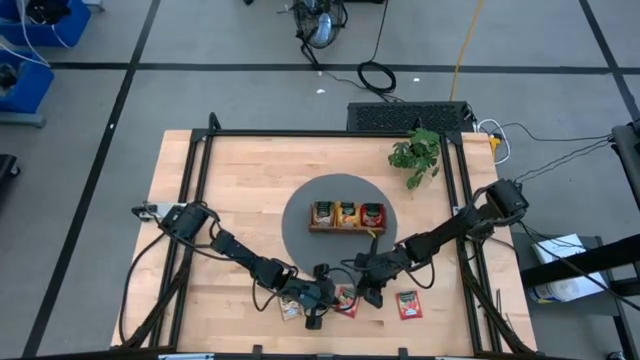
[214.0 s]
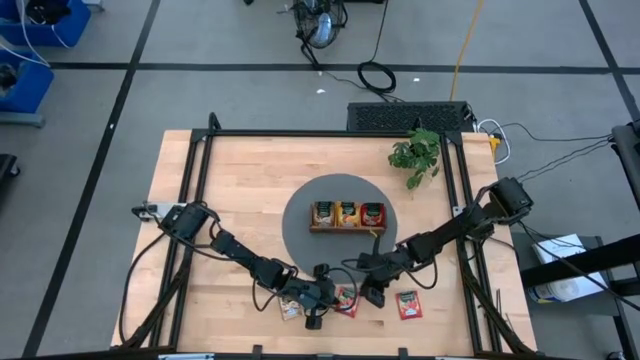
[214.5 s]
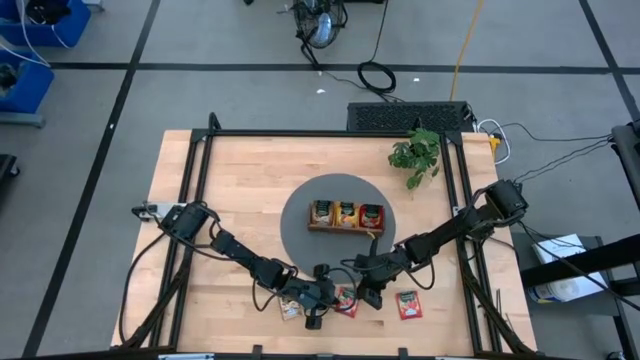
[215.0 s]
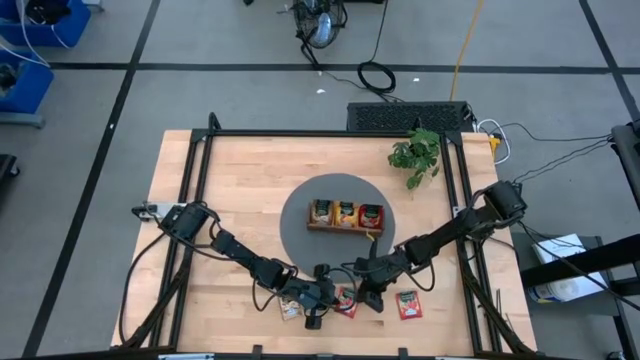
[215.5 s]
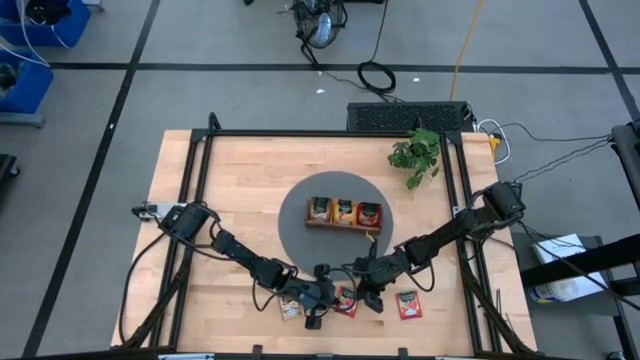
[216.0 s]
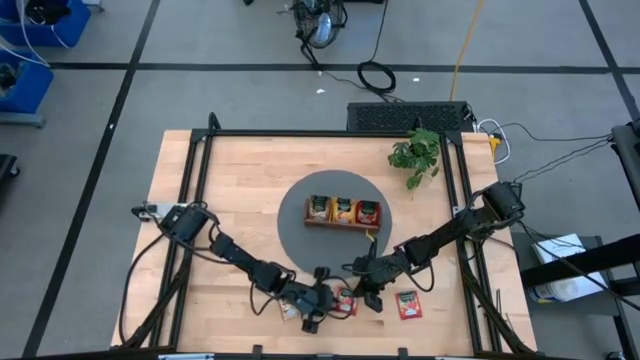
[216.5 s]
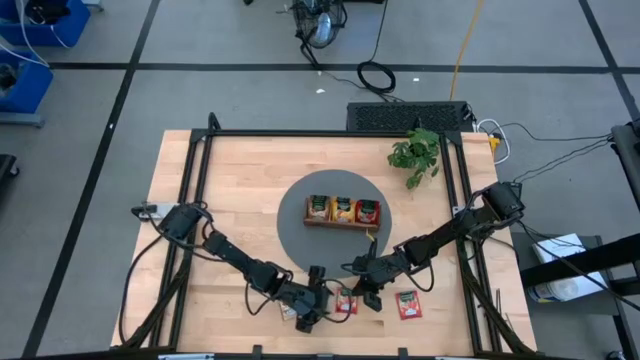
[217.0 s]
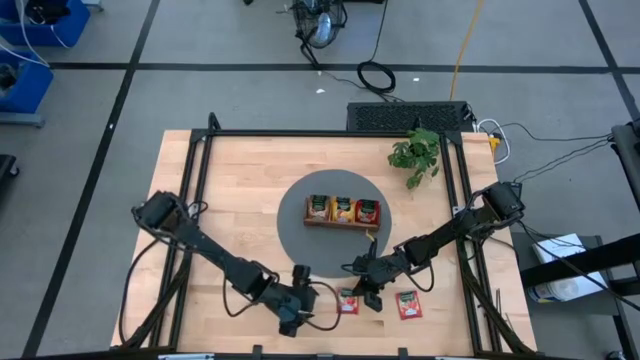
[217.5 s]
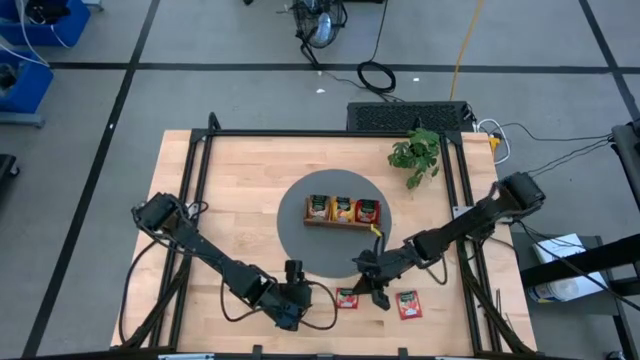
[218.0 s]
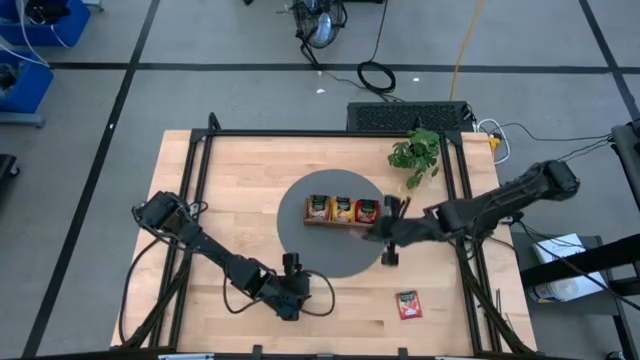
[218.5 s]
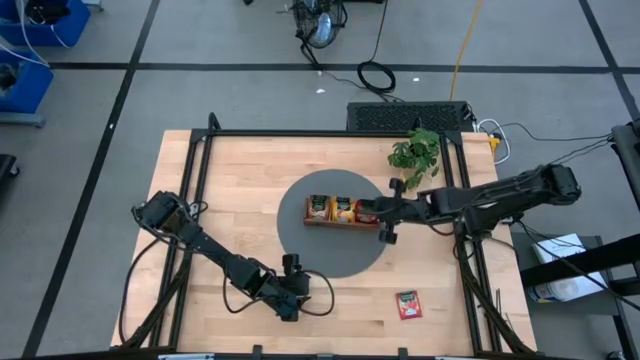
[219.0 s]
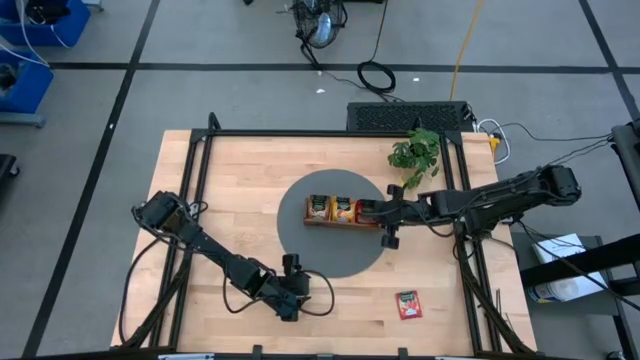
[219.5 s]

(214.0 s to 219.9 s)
Task: Pick & Place Tea
Put the red tea bag to the right section into the wooden organizer

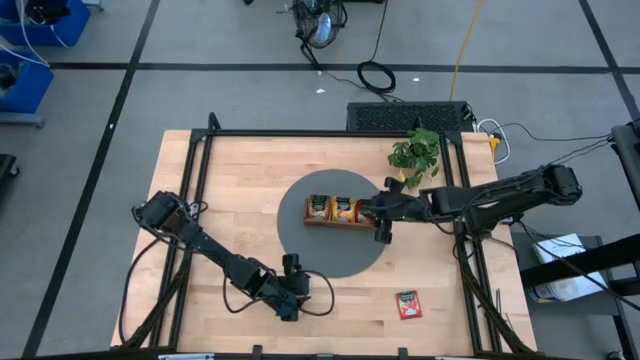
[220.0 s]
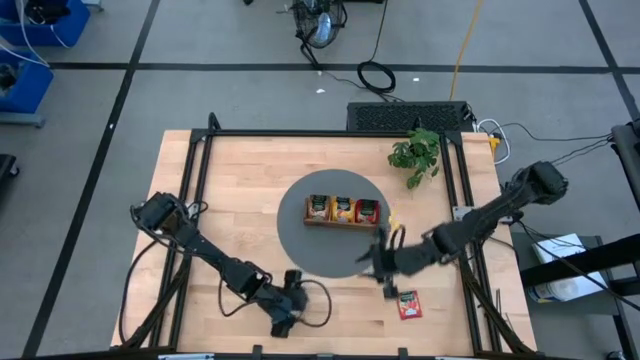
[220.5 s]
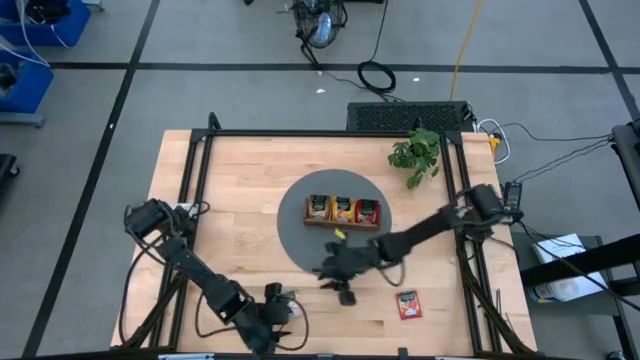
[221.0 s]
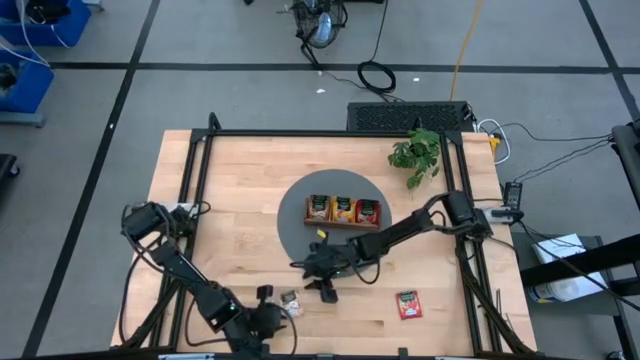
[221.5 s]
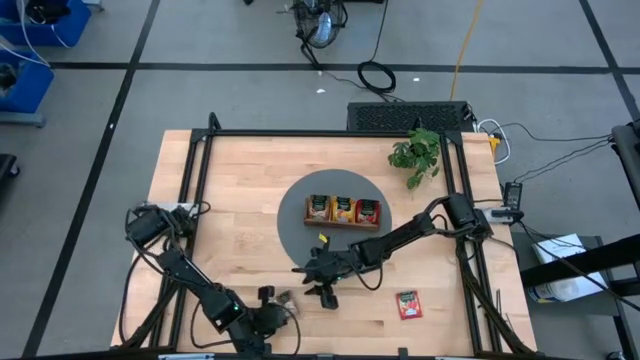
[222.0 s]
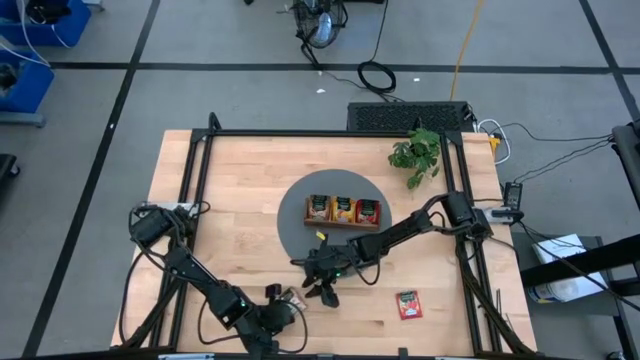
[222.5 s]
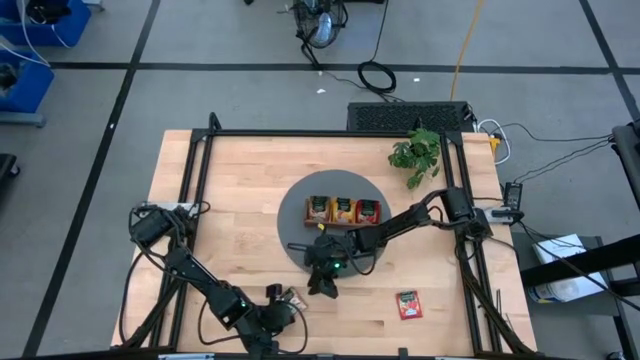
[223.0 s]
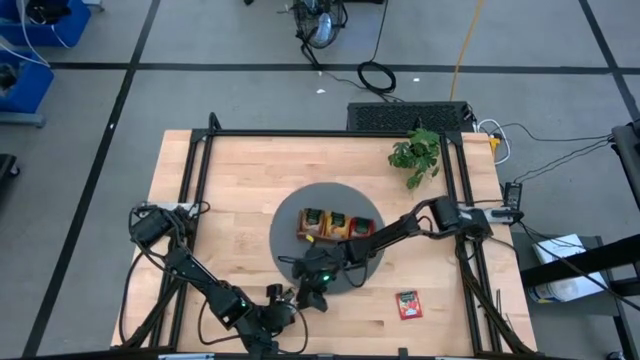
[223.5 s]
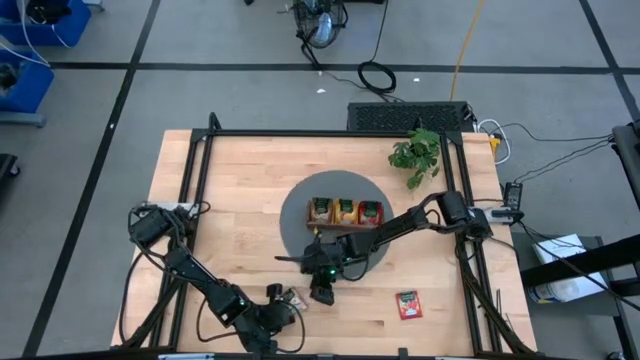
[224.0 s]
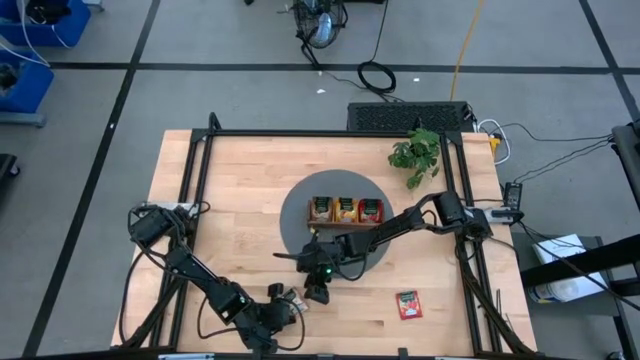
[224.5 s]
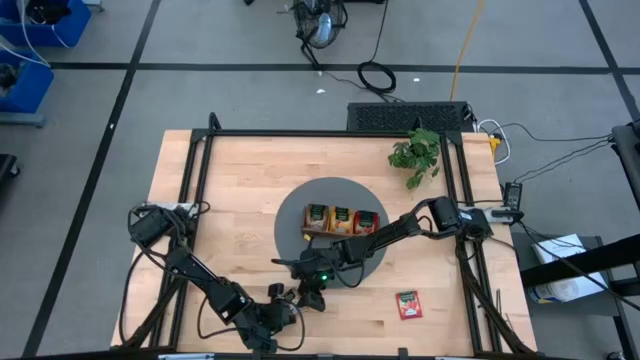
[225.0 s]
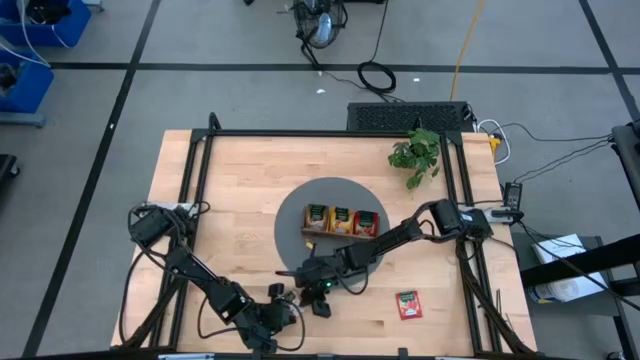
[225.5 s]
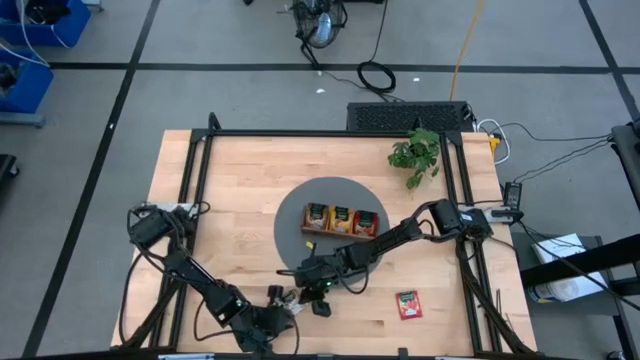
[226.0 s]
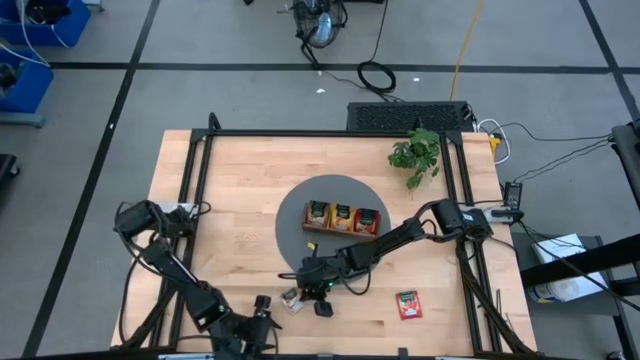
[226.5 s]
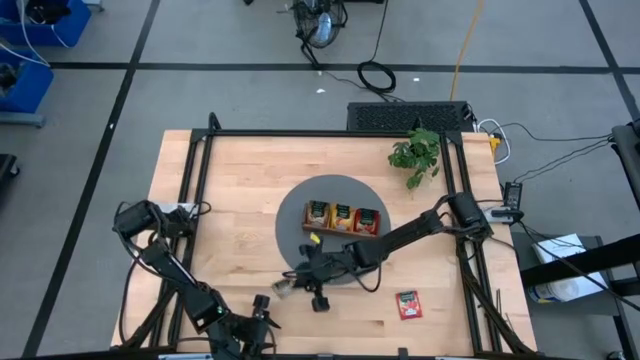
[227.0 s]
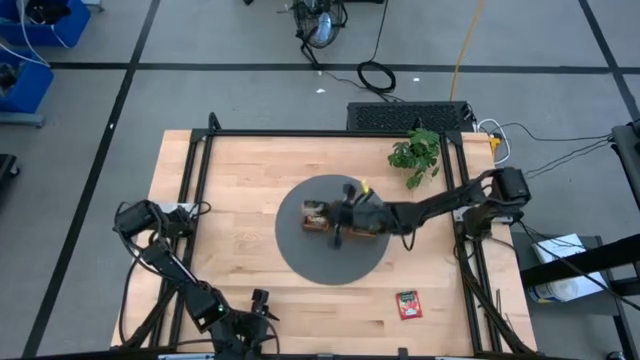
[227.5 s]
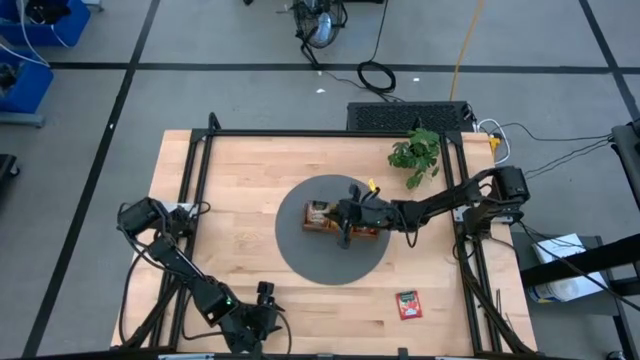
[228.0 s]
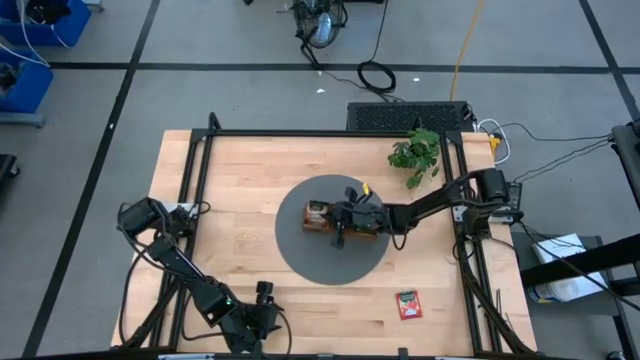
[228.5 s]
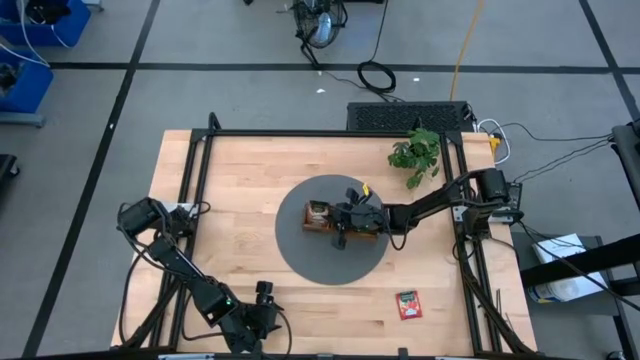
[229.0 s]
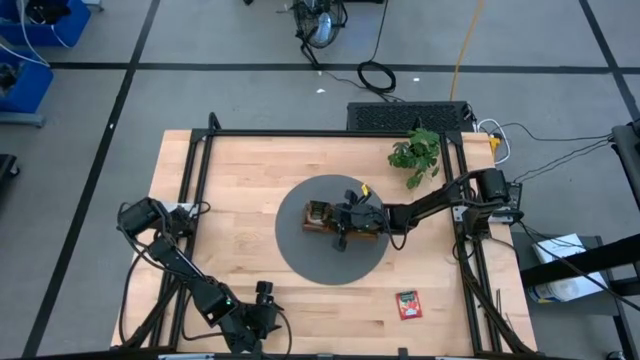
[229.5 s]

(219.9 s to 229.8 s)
Put the brown tea bag to the left section into the wooden organizer

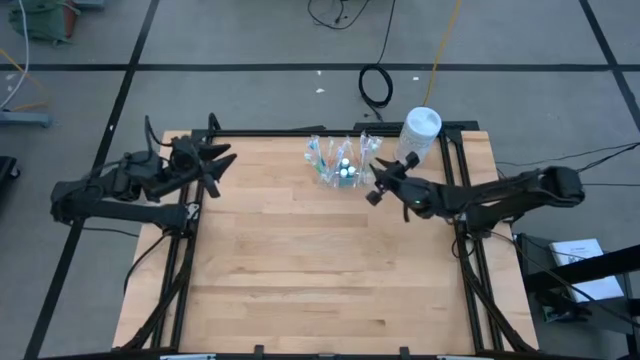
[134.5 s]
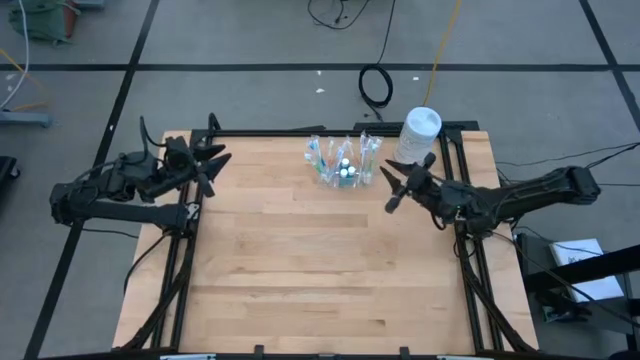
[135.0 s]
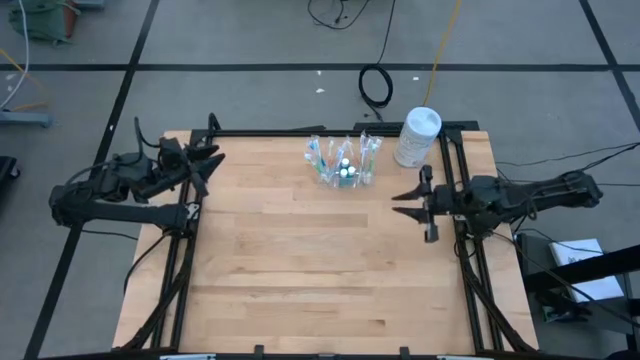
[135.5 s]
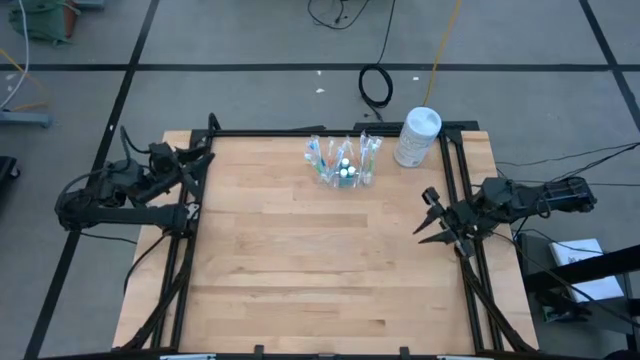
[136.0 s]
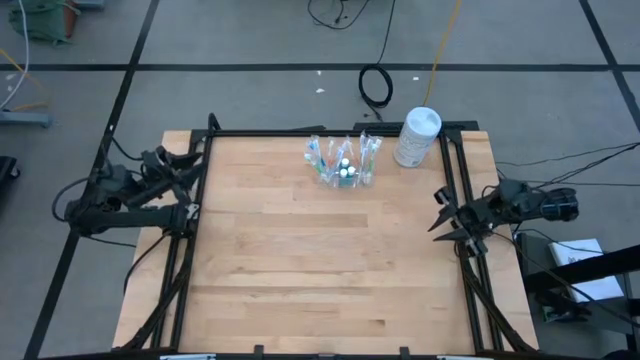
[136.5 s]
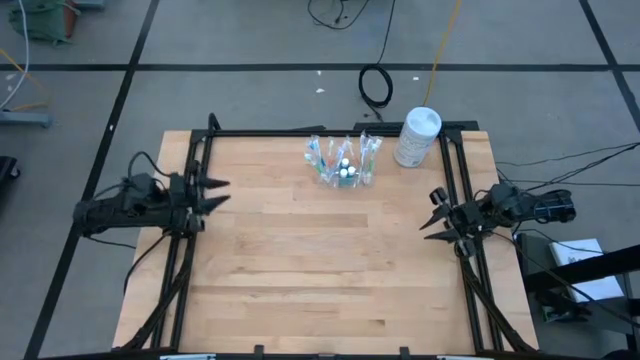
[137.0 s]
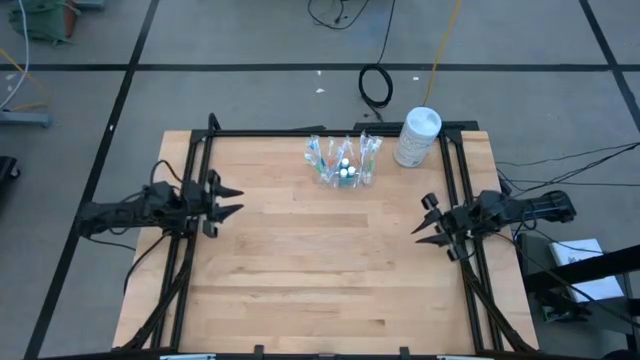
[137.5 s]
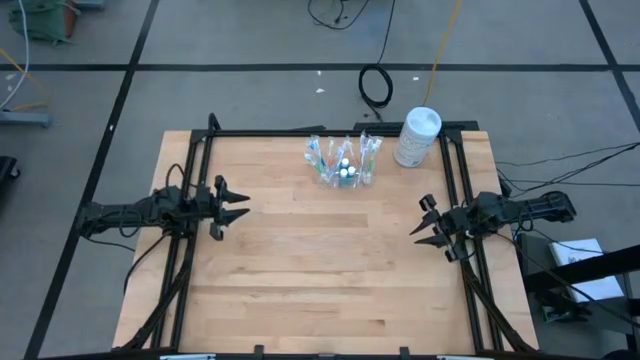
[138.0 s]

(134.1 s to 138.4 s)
Task: Pick & Place toothbrushing station
Return to Home Position
